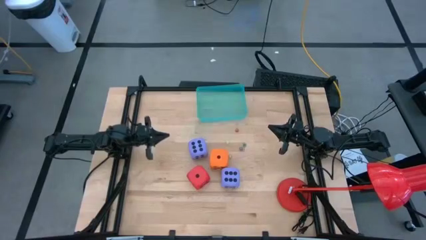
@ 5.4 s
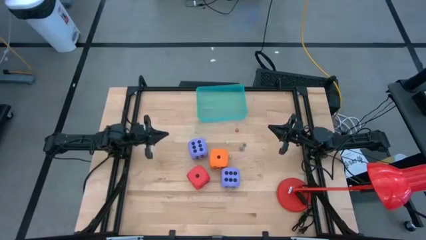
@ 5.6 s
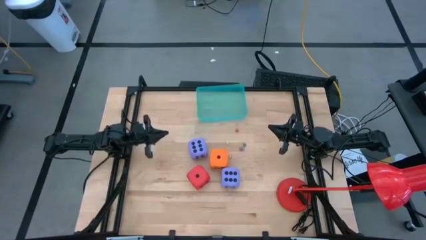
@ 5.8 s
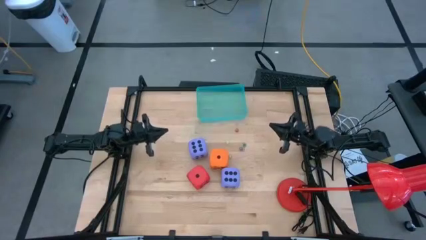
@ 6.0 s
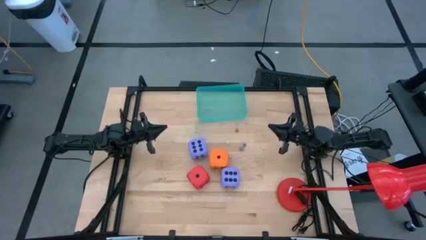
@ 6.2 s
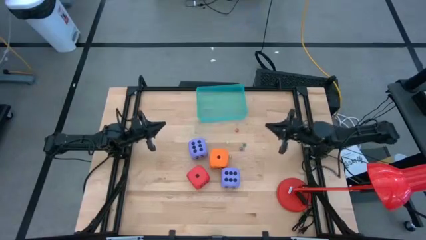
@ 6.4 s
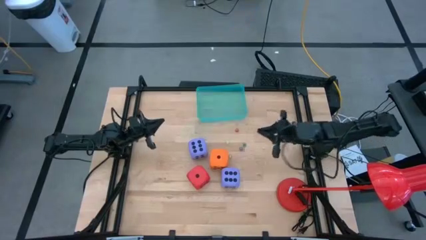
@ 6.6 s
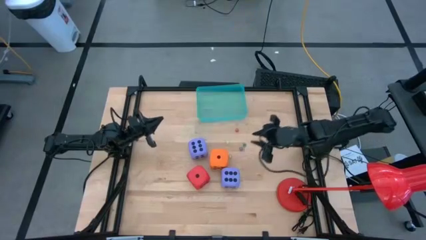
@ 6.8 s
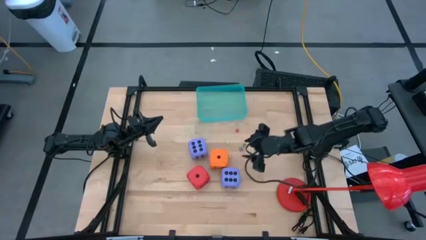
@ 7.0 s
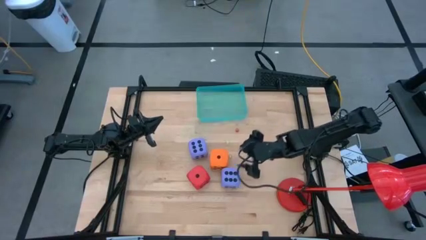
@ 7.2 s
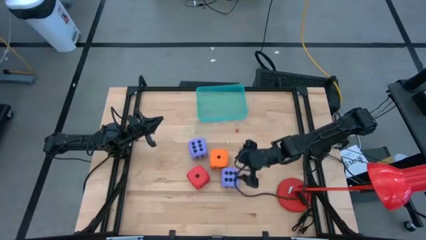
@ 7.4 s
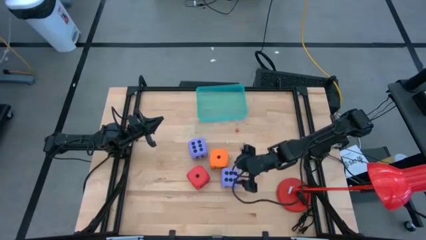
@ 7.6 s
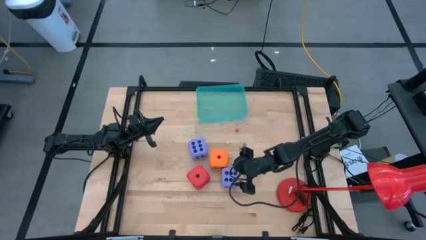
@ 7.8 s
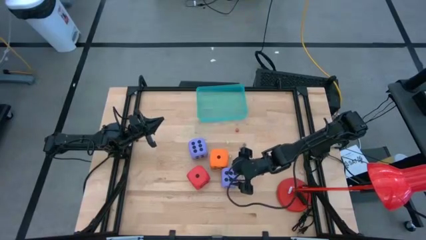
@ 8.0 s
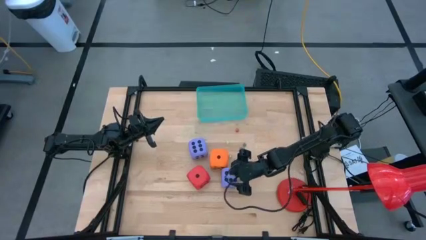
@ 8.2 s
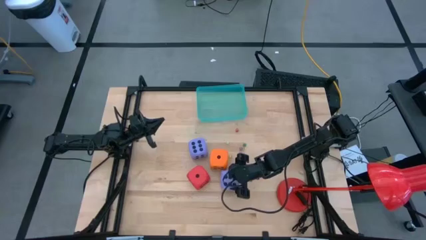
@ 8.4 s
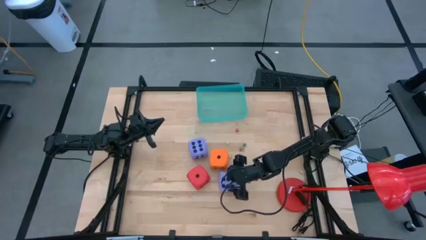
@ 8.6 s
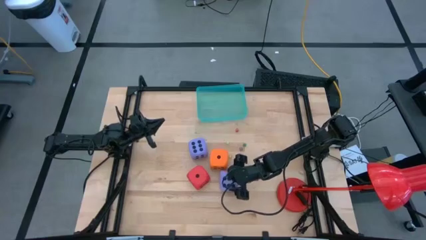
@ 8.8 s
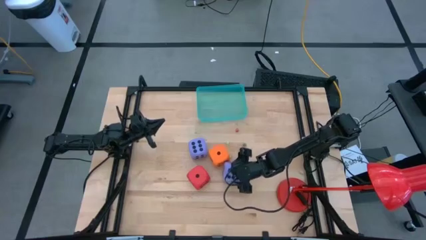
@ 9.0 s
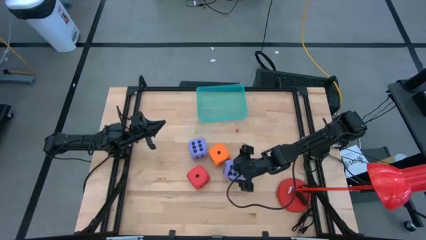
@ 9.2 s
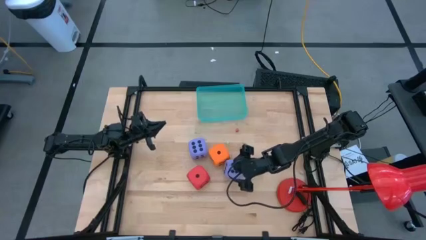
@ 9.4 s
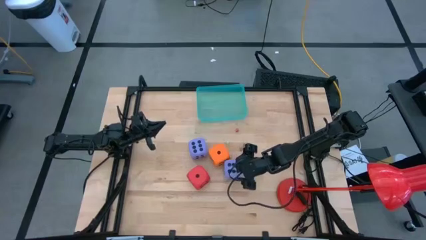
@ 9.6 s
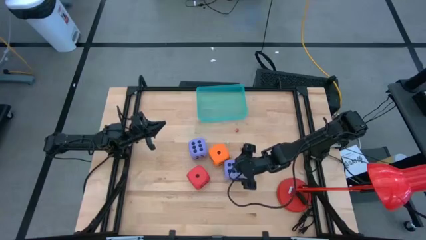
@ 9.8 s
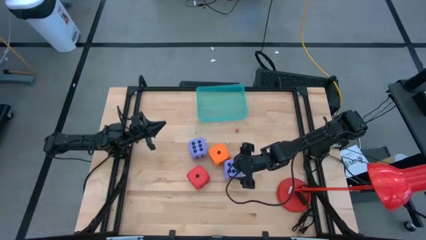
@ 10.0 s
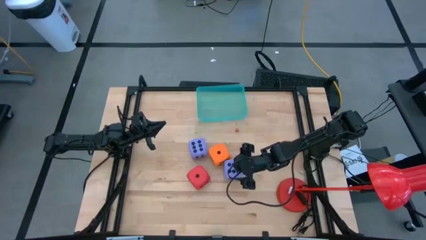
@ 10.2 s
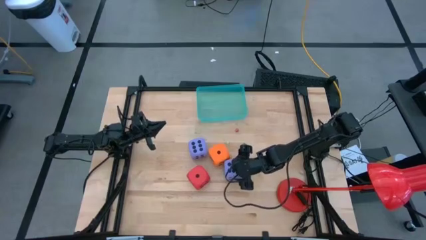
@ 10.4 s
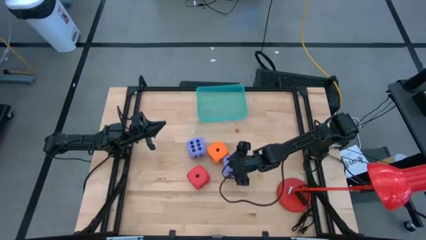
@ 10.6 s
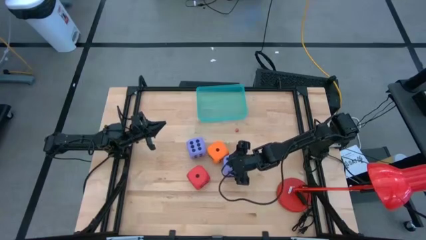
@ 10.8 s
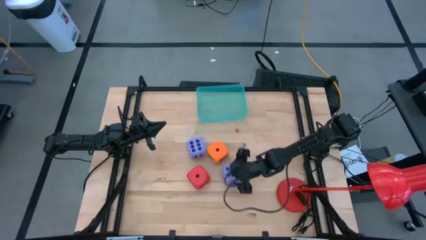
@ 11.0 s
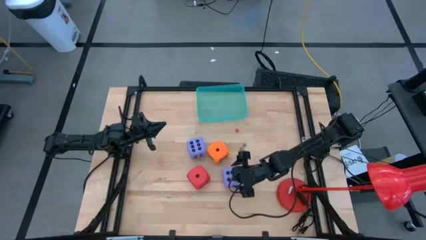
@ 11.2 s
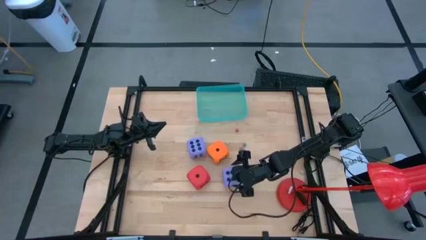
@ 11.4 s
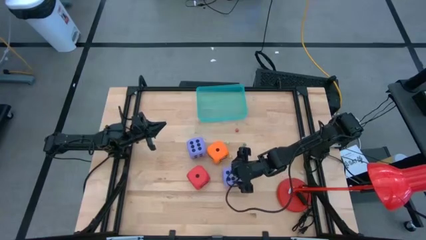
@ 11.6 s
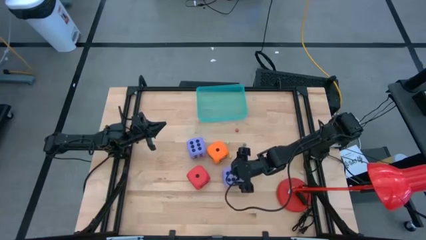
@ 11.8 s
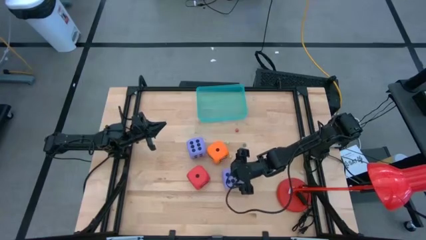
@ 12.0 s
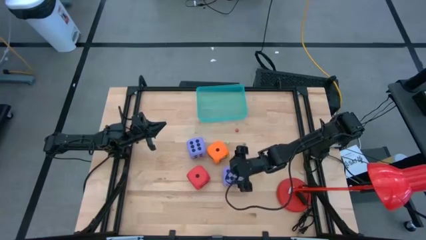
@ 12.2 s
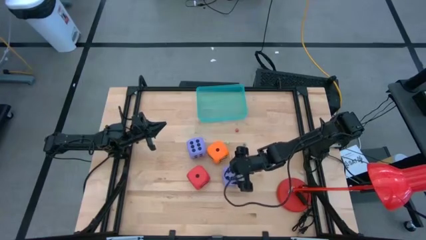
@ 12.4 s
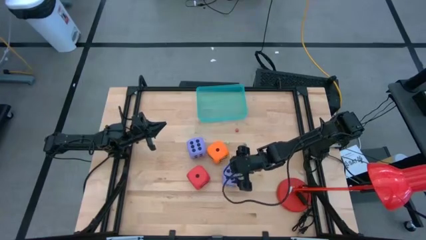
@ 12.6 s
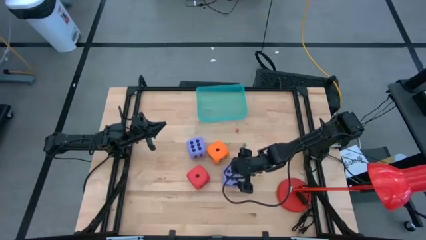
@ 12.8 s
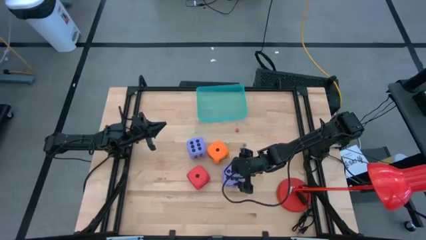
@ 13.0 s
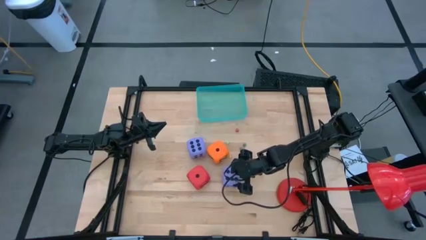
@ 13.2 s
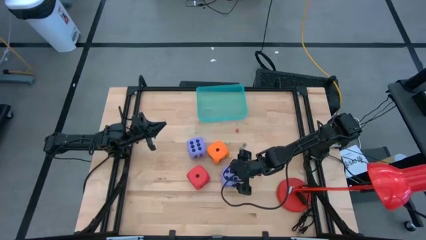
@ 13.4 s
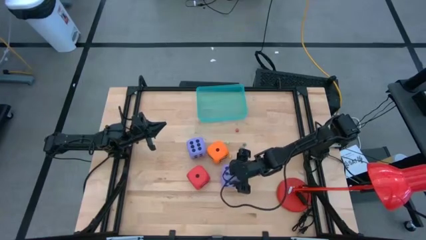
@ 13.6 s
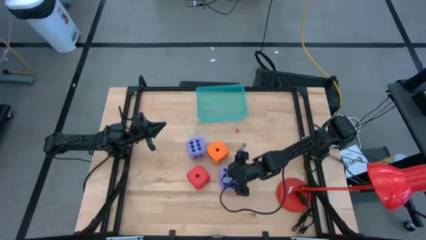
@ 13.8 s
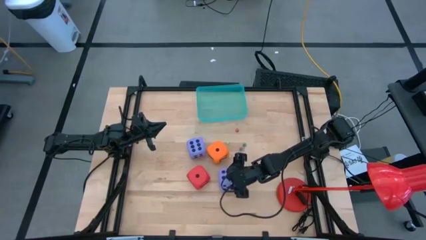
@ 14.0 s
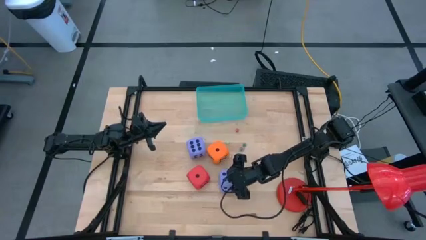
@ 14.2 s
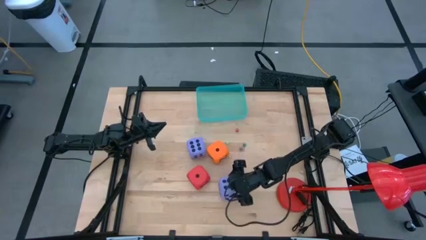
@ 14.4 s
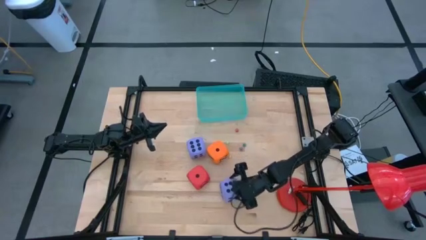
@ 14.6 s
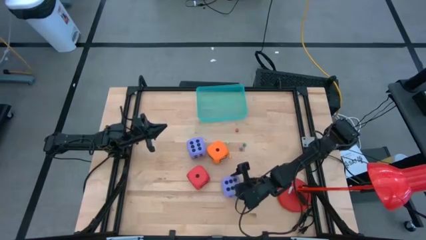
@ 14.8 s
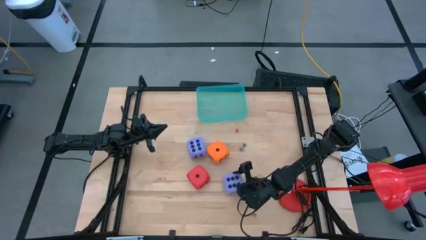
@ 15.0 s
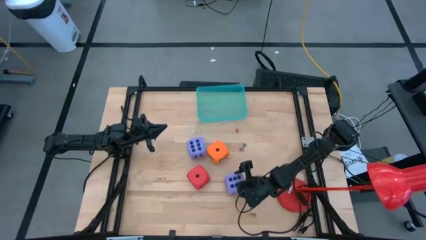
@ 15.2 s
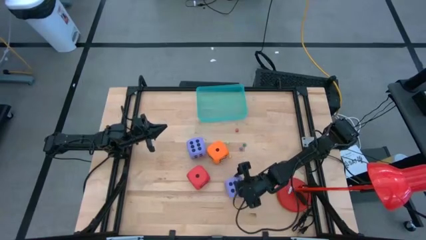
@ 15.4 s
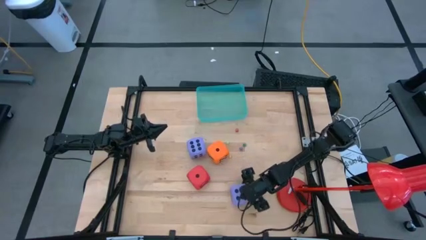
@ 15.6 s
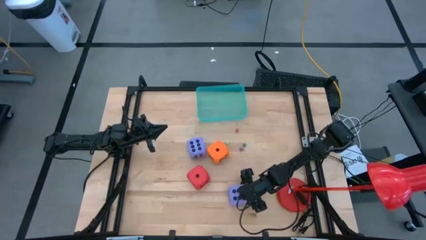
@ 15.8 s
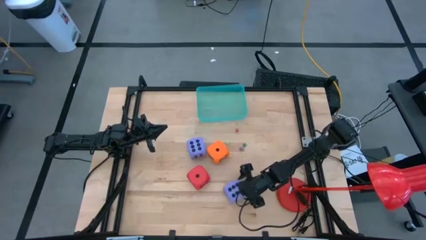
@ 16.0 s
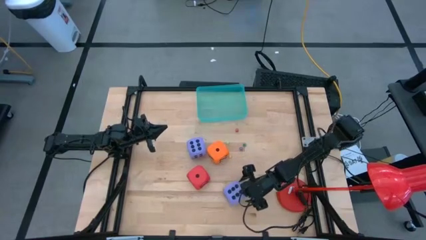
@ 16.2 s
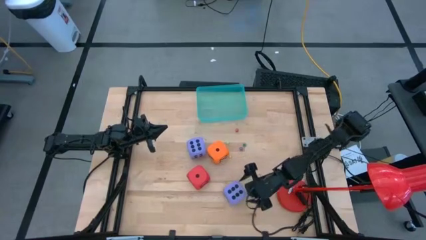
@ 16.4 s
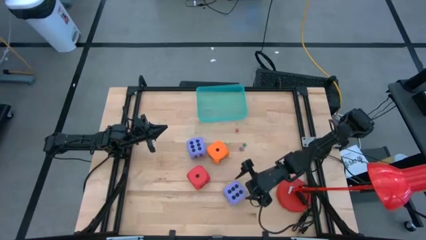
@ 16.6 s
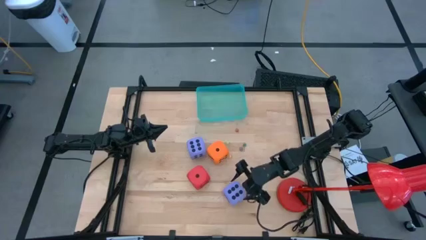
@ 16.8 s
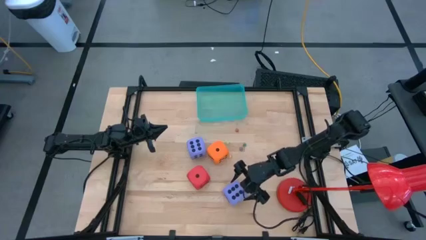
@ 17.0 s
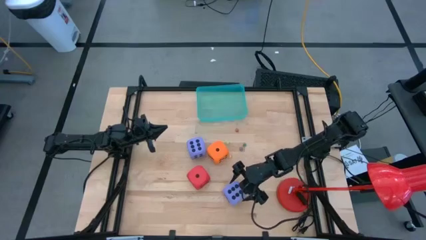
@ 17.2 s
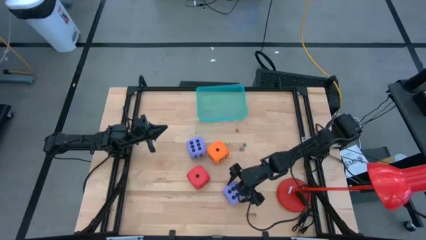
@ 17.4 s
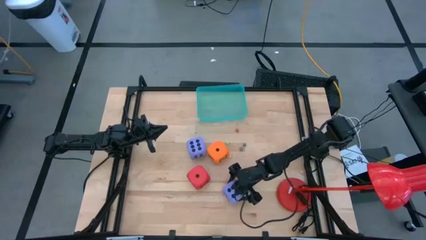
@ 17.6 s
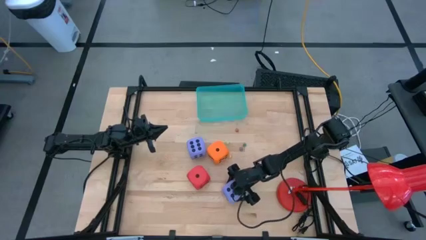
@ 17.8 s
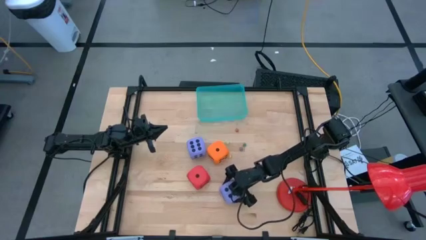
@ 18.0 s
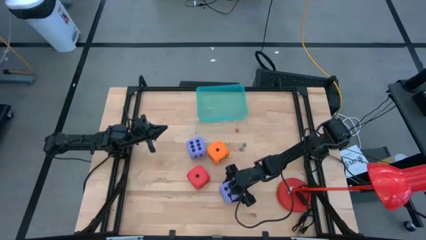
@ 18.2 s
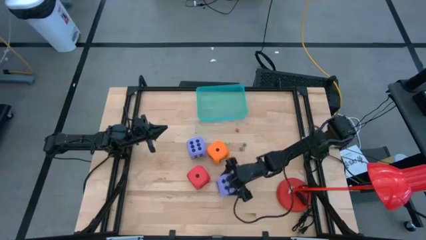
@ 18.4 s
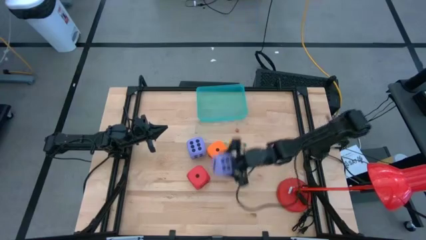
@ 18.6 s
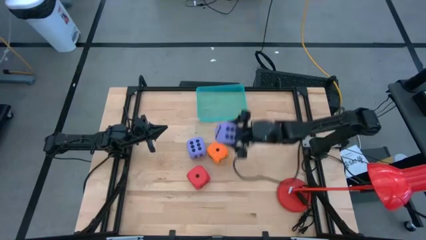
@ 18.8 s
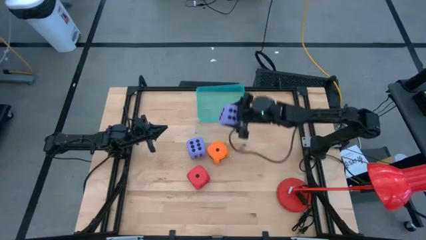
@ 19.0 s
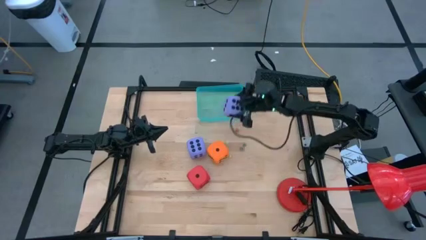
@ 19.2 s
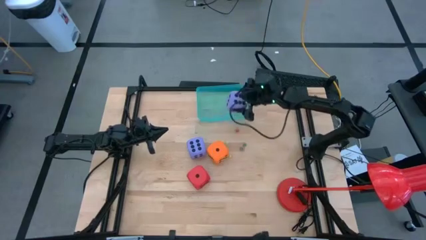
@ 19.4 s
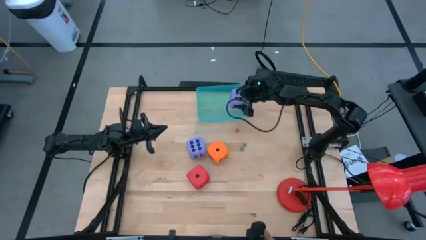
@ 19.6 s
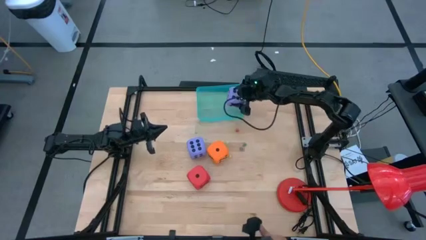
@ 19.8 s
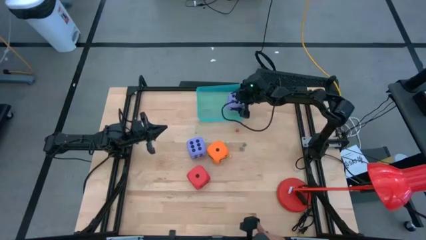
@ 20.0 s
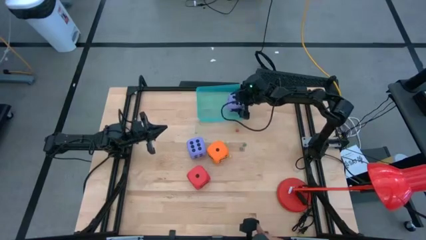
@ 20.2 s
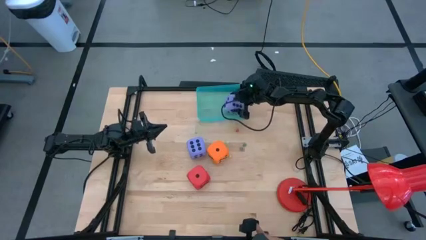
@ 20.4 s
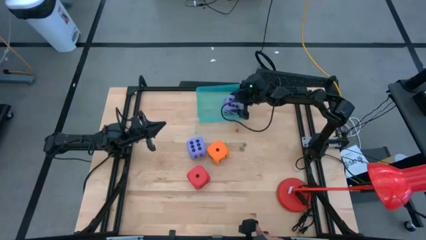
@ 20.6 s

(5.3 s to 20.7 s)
Task: Pick & Place Dice
Put the right big violet dice into the green bin
